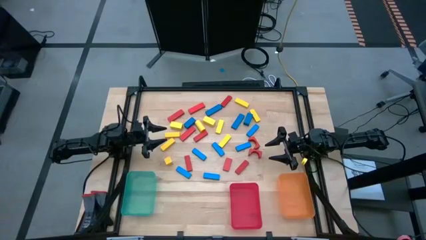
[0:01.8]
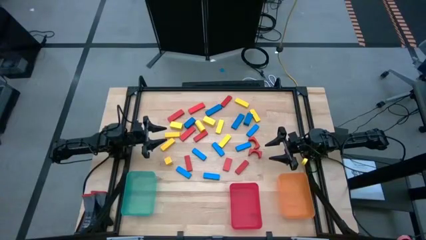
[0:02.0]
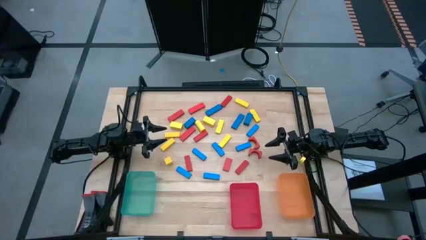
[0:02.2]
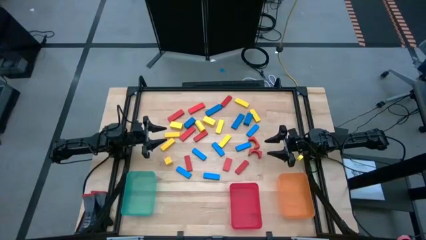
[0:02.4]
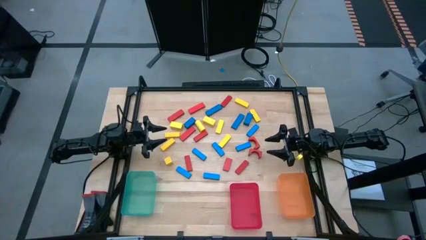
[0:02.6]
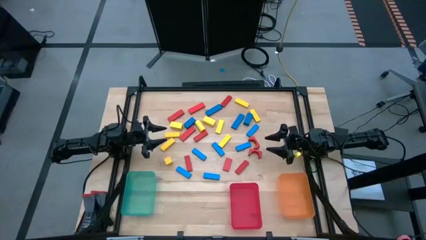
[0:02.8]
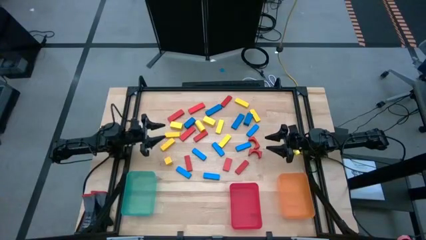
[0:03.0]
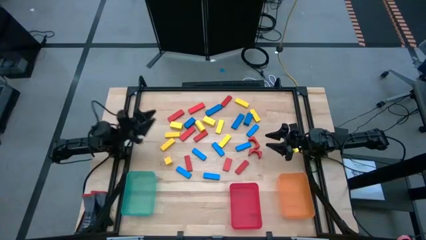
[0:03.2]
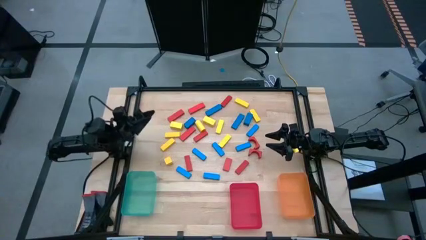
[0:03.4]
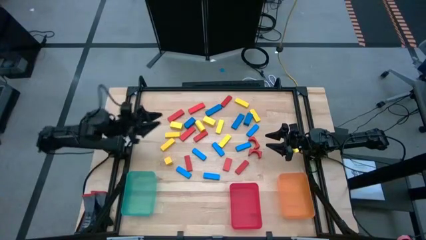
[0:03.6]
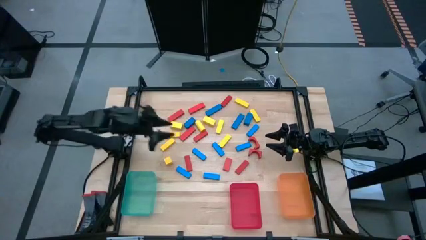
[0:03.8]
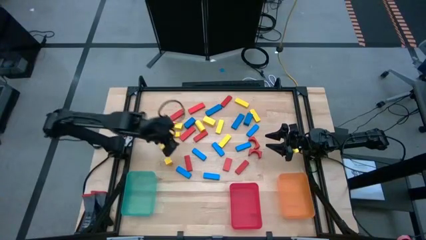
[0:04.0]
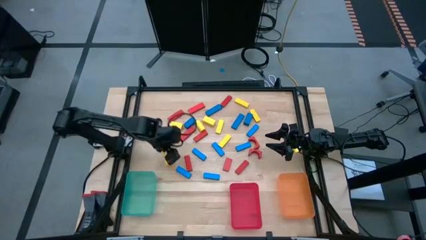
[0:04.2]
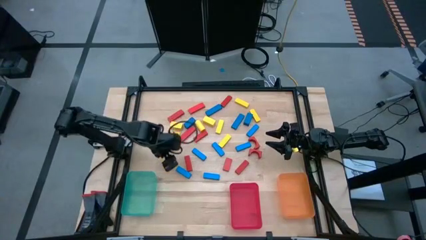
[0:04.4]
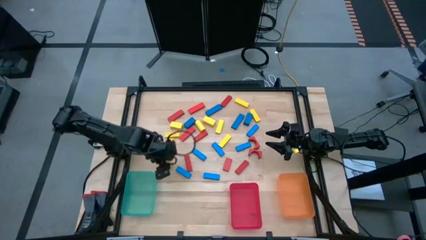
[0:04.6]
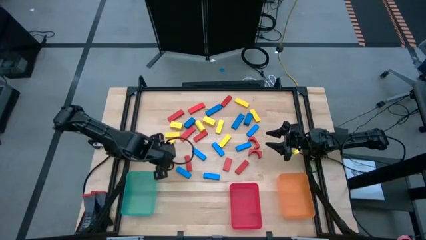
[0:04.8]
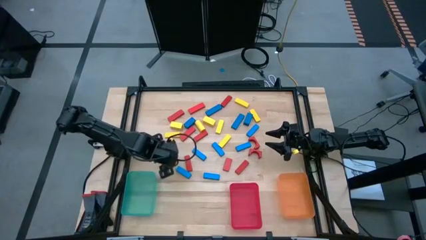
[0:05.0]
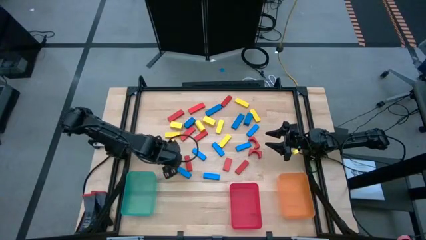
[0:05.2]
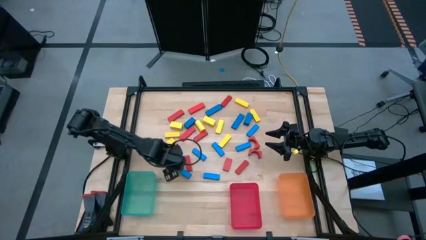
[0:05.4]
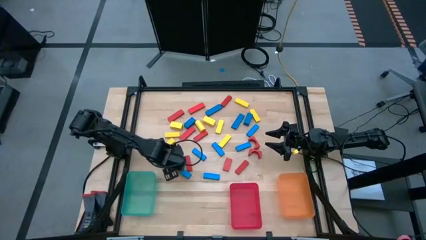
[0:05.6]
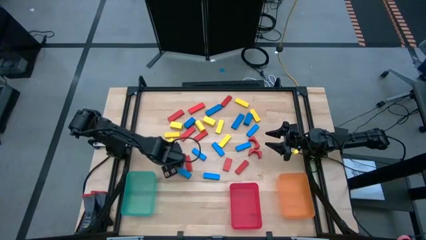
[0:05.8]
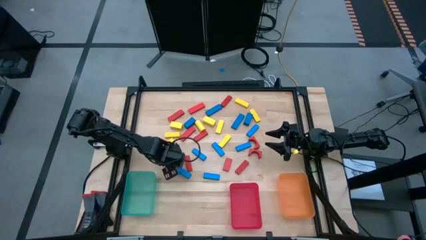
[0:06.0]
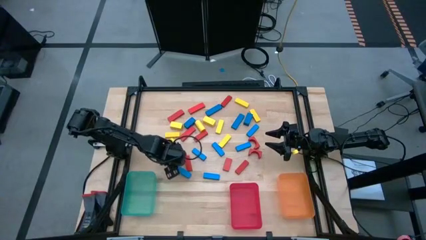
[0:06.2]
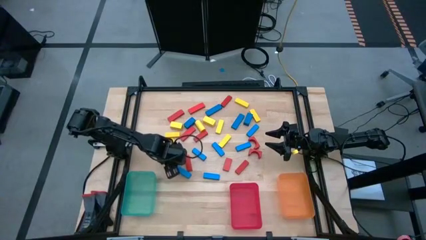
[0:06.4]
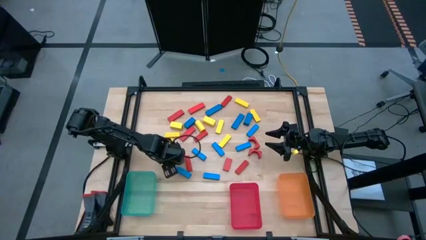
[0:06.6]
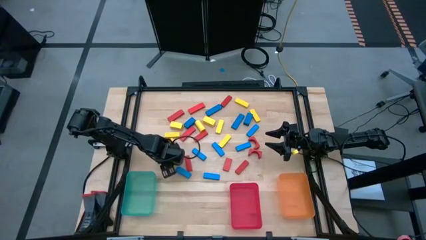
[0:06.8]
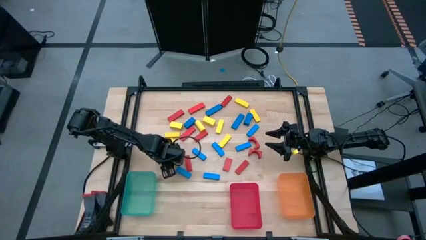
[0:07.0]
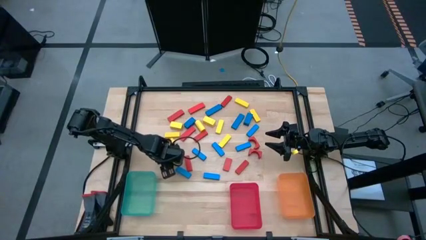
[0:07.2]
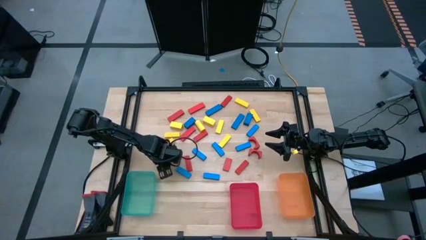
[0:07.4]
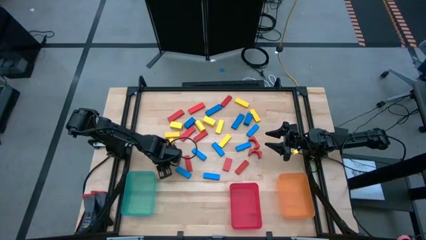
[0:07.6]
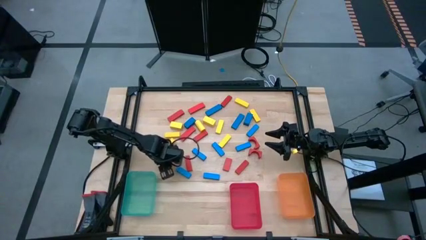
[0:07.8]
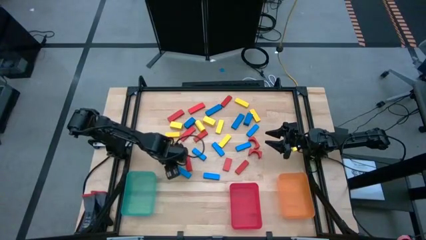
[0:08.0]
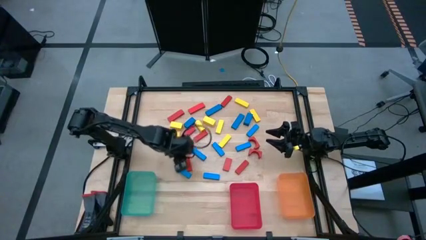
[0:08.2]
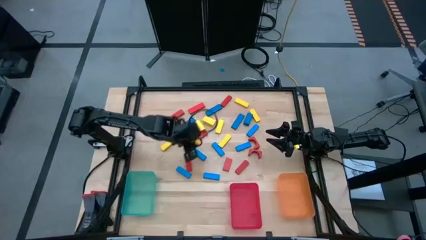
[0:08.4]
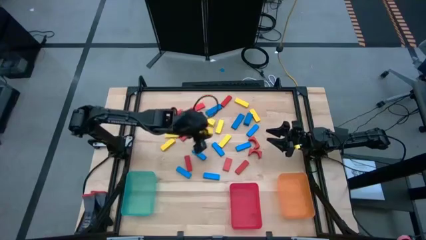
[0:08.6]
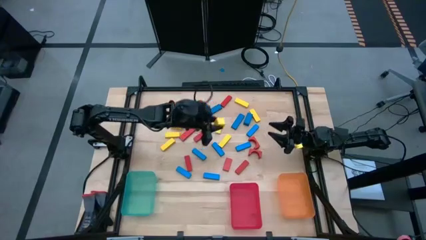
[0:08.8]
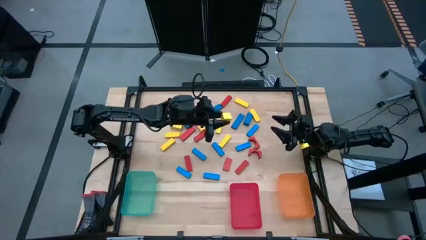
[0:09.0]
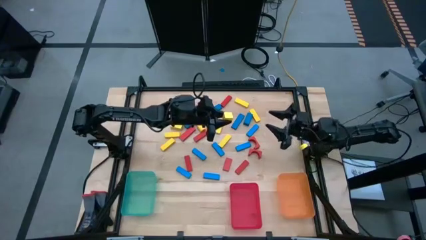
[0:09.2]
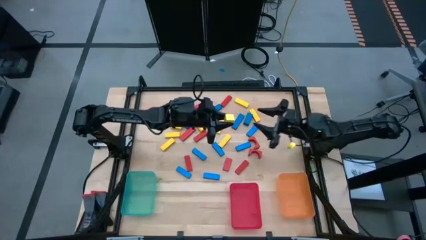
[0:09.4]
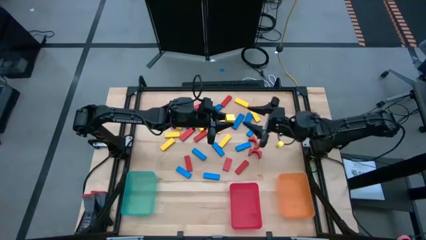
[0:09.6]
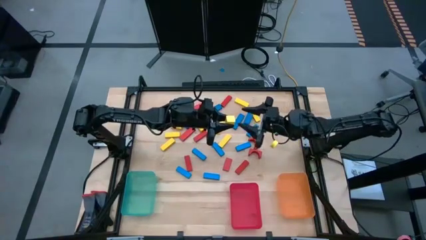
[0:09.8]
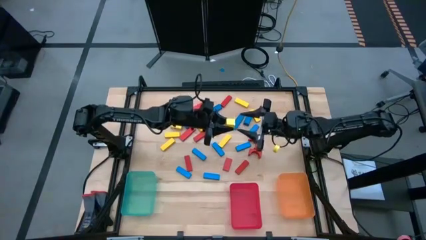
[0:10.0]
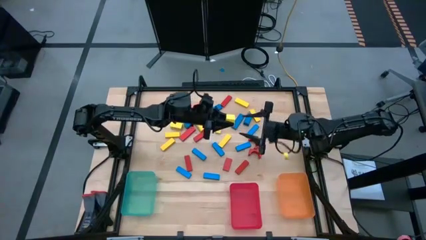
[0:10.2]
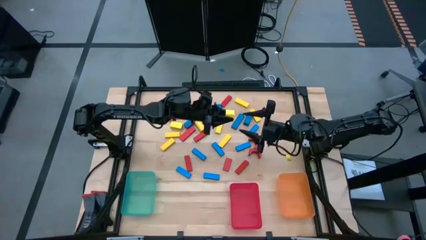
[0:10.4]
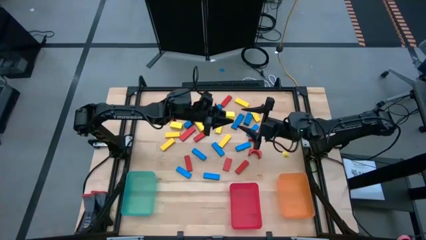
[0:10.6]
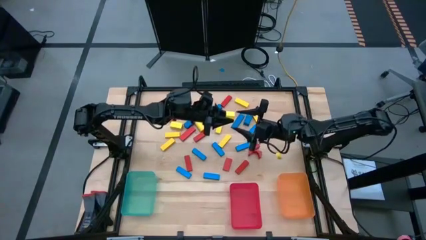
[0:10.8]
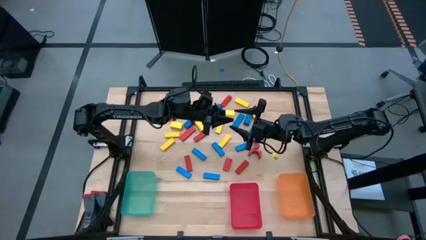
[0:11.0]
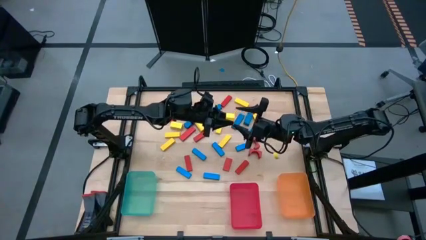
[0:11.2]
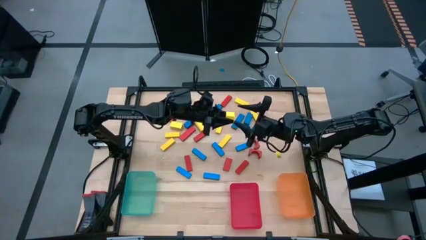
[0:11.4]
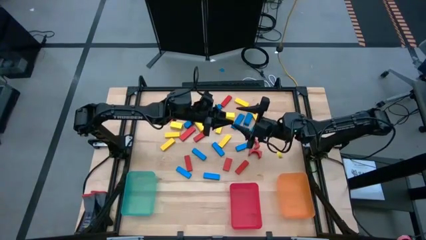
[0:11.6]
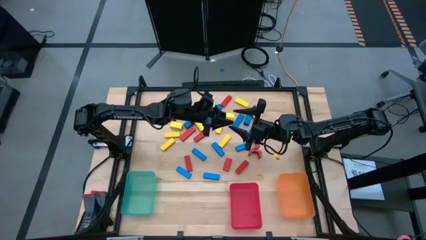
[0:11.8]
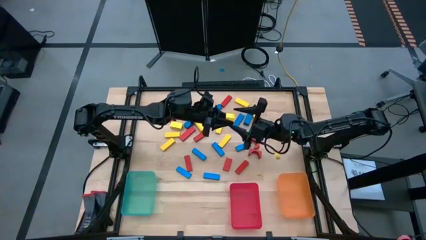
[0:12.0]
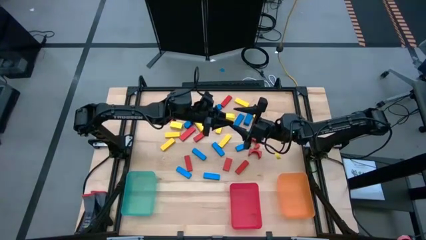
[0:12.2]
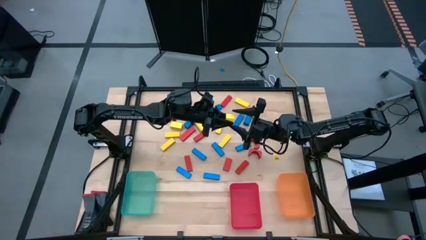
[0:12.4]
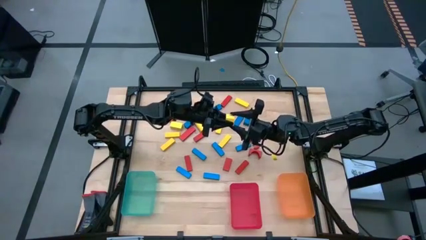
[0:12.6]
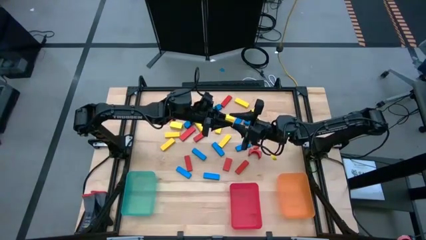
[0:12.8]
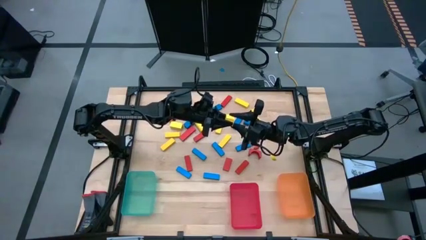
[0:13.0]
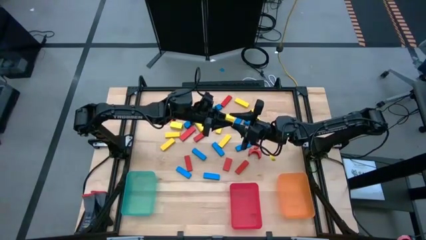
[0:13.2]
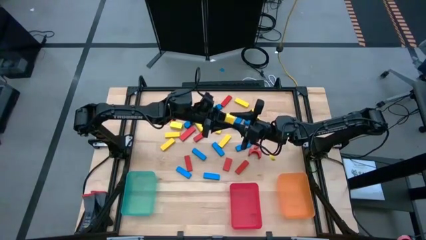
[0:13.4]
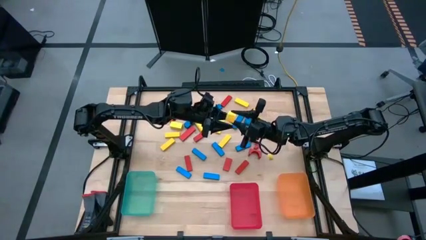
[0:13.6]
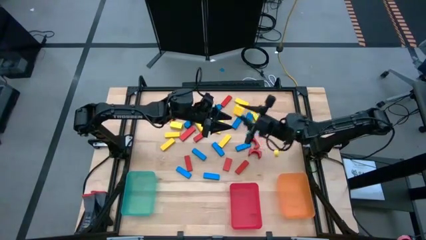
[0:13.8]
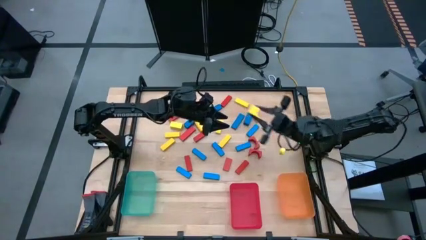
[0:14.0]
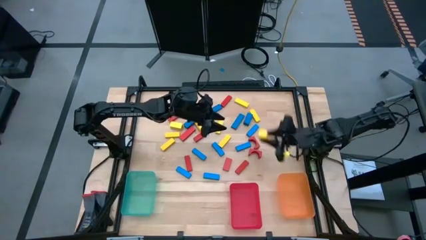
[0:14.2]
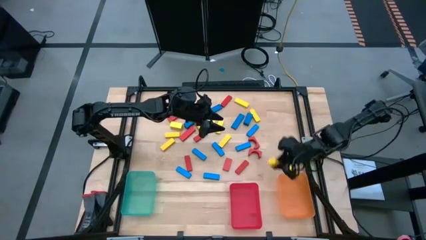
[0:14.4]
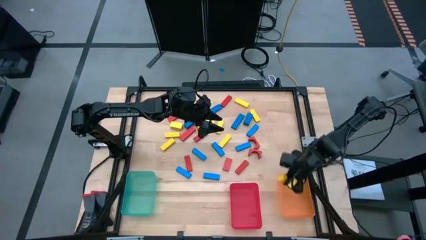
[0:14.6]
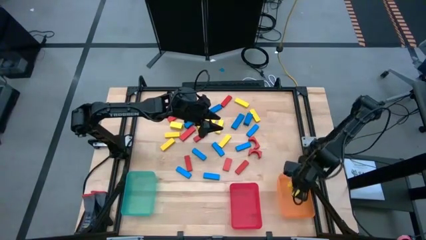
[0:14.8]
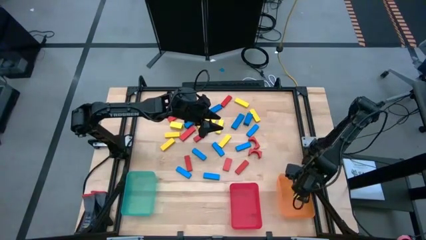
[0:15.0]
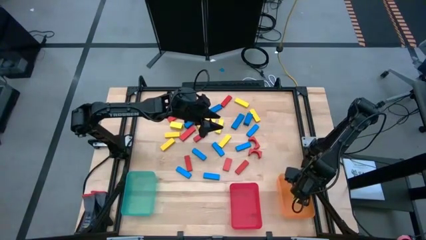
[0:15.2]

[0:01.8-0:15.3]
Task: Sort blocks
Put the yellow block into the orange bin
